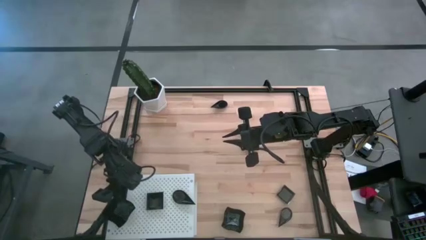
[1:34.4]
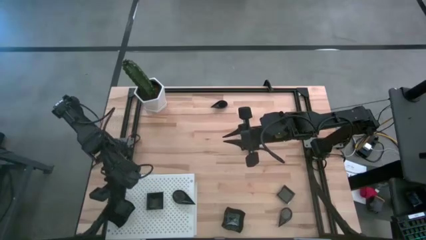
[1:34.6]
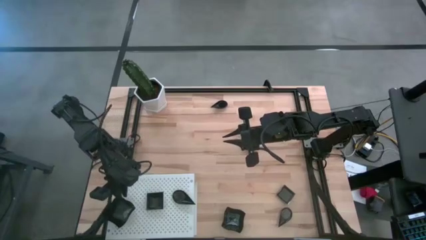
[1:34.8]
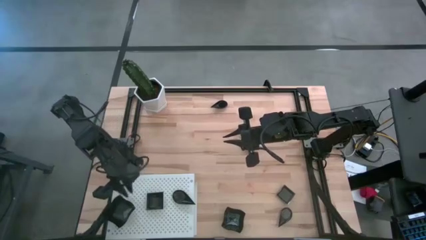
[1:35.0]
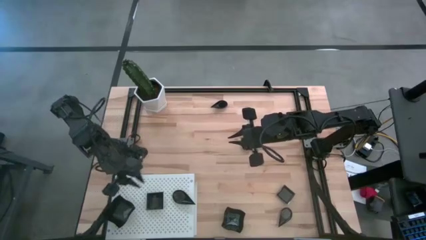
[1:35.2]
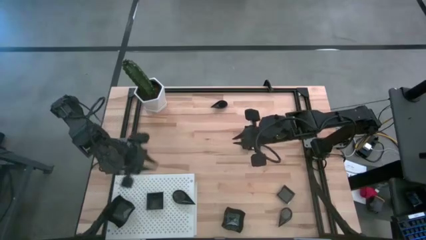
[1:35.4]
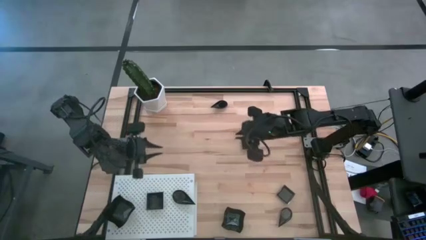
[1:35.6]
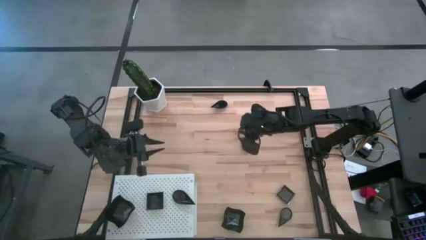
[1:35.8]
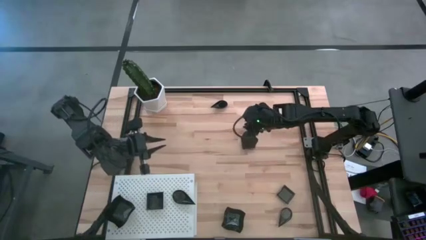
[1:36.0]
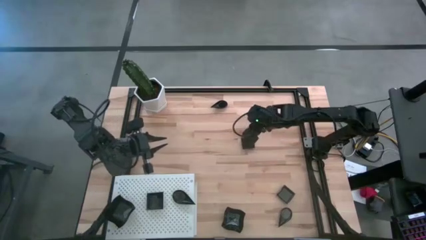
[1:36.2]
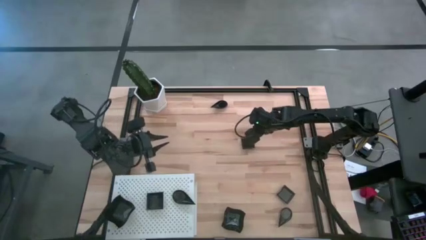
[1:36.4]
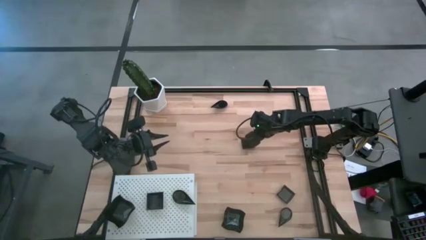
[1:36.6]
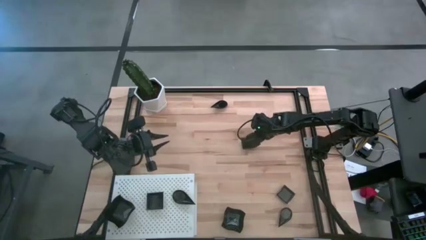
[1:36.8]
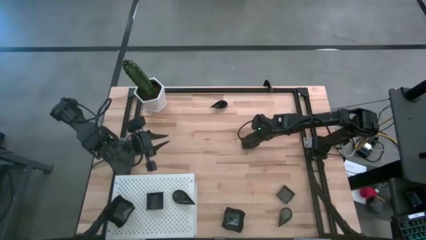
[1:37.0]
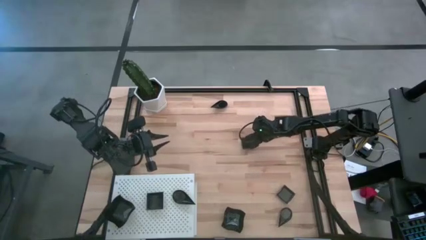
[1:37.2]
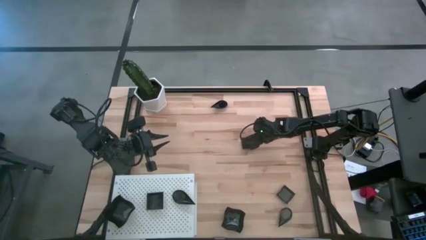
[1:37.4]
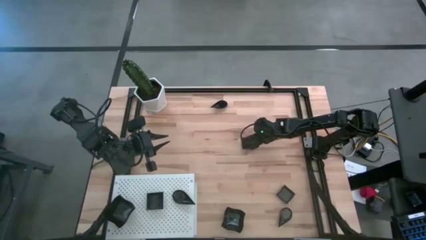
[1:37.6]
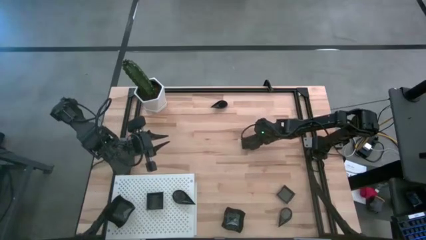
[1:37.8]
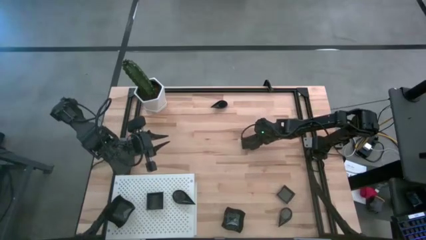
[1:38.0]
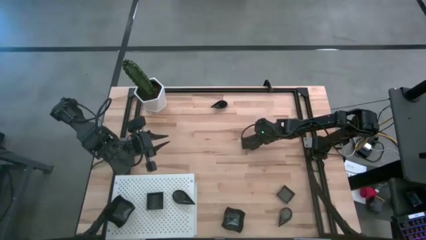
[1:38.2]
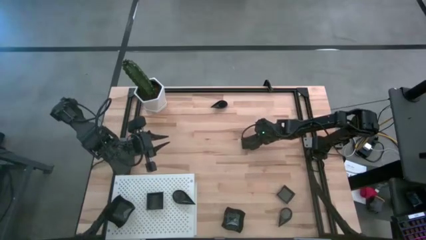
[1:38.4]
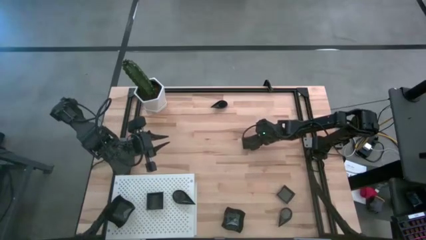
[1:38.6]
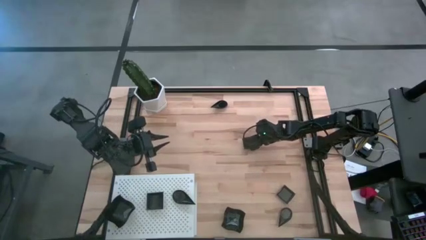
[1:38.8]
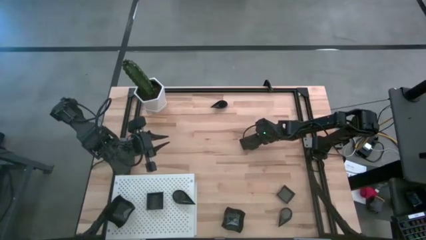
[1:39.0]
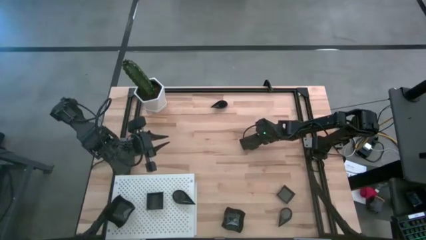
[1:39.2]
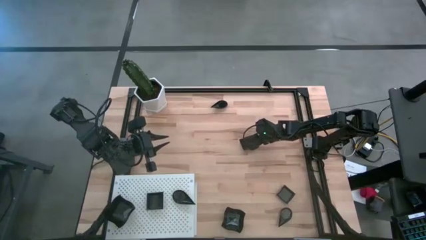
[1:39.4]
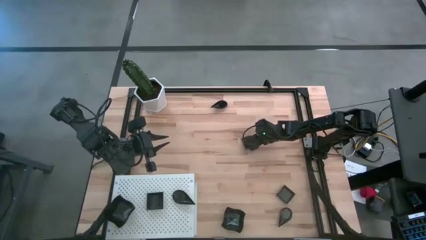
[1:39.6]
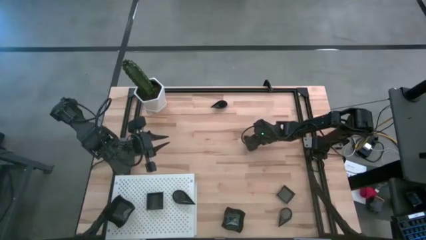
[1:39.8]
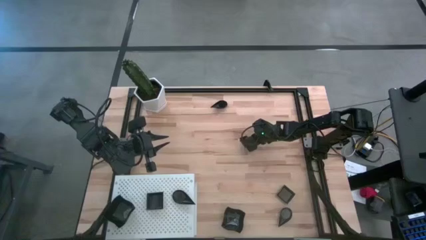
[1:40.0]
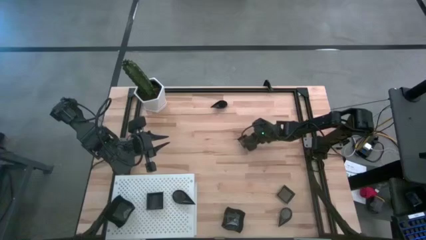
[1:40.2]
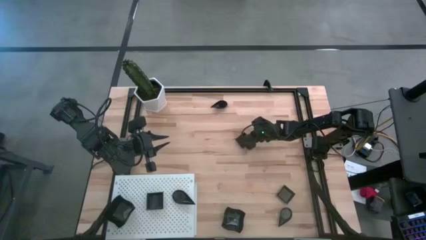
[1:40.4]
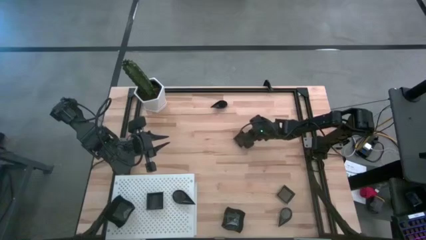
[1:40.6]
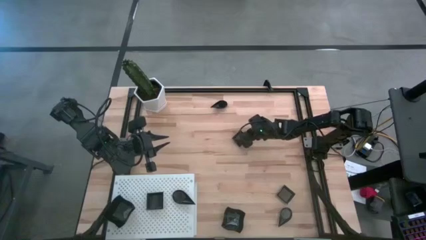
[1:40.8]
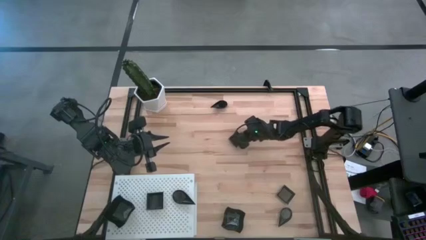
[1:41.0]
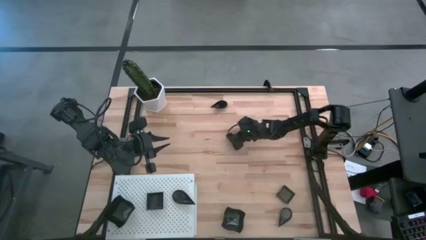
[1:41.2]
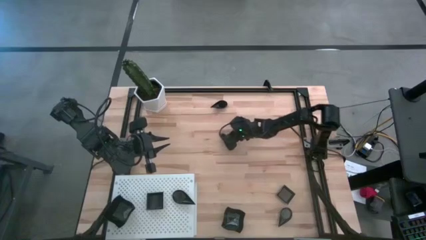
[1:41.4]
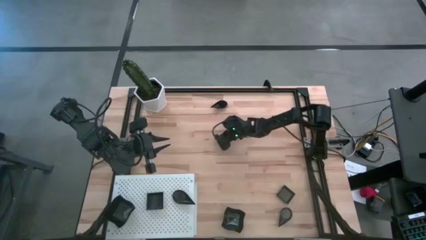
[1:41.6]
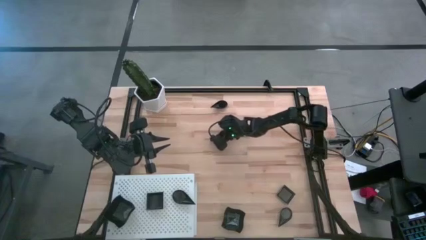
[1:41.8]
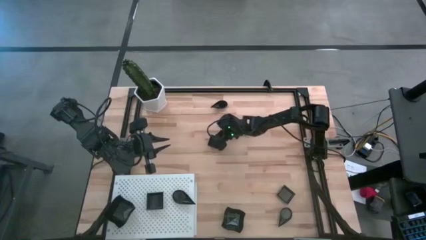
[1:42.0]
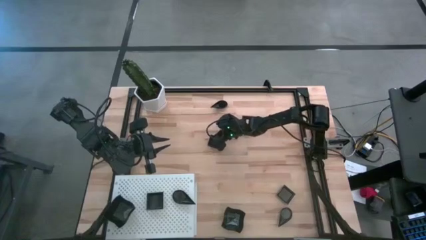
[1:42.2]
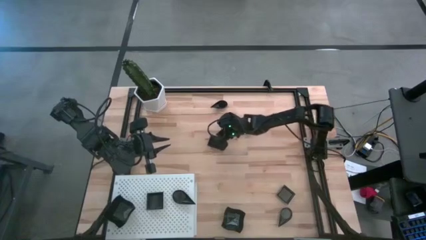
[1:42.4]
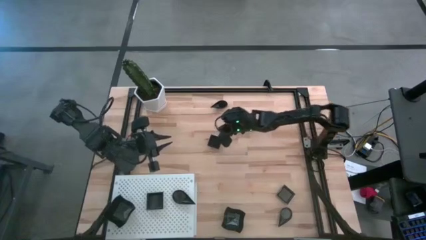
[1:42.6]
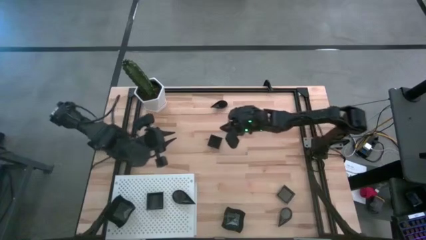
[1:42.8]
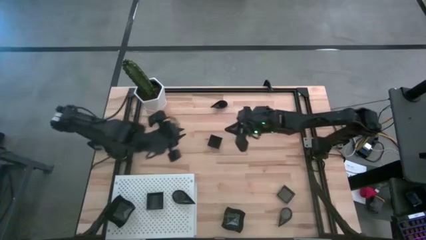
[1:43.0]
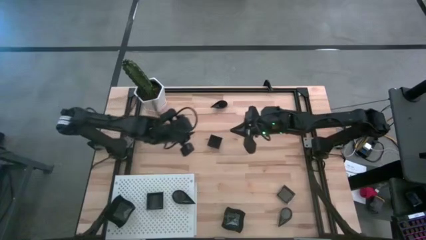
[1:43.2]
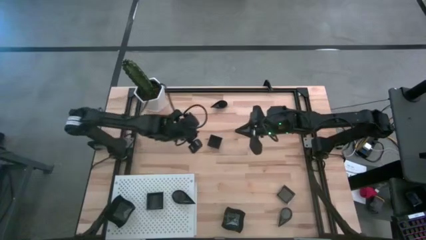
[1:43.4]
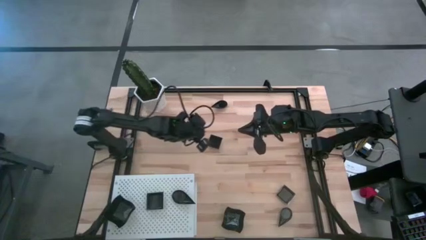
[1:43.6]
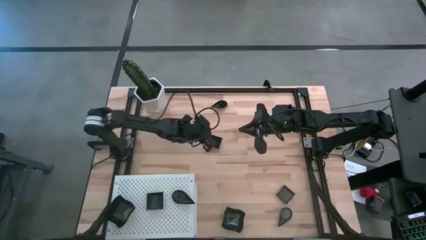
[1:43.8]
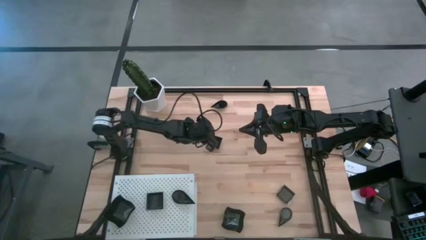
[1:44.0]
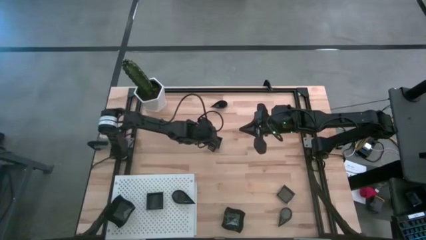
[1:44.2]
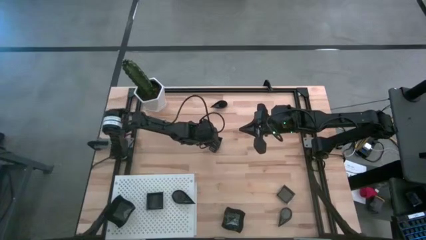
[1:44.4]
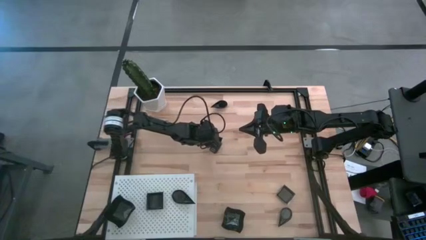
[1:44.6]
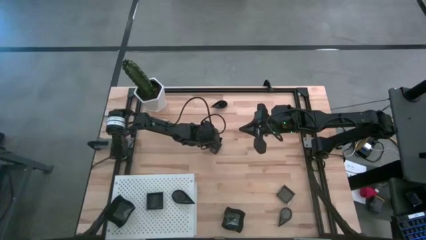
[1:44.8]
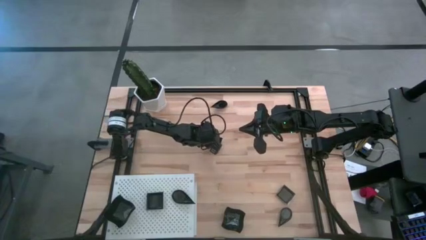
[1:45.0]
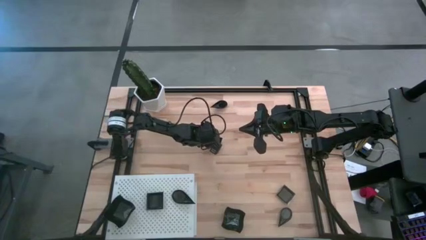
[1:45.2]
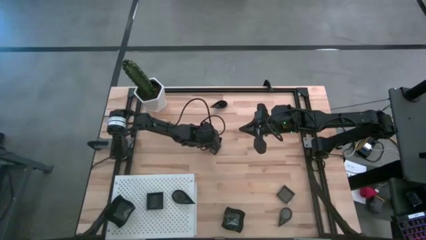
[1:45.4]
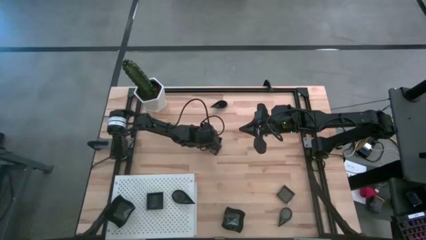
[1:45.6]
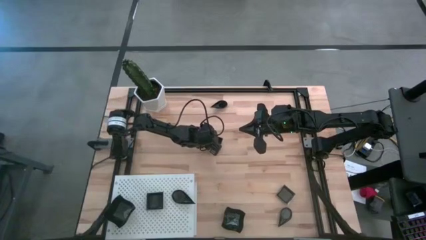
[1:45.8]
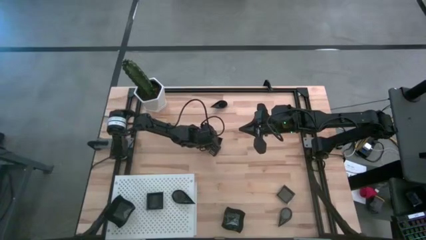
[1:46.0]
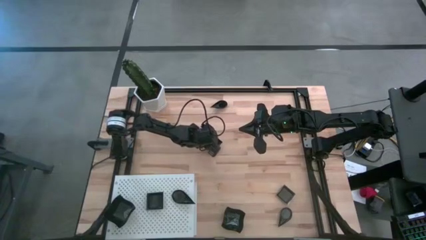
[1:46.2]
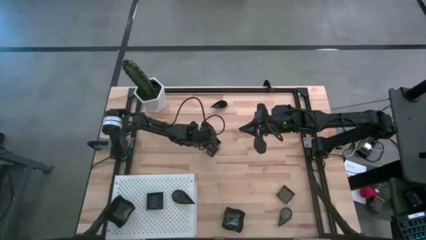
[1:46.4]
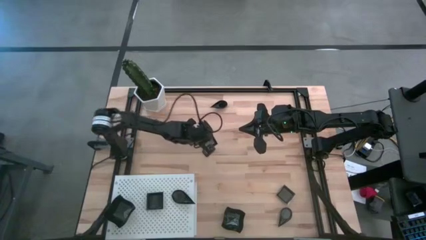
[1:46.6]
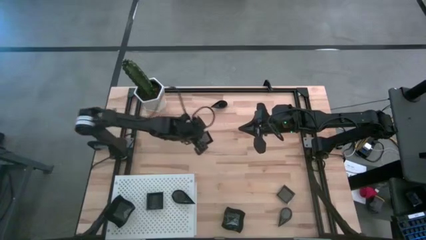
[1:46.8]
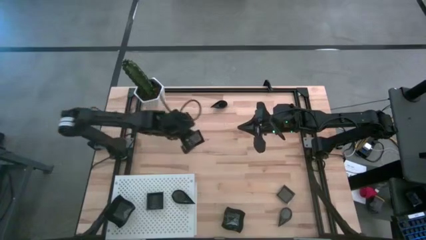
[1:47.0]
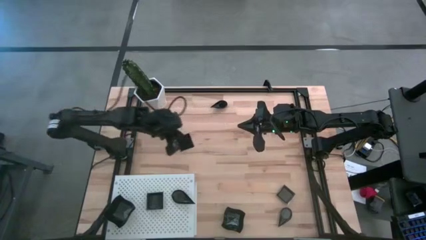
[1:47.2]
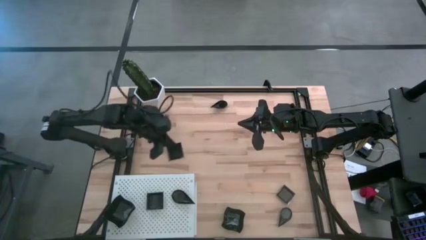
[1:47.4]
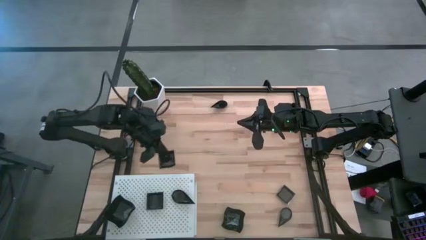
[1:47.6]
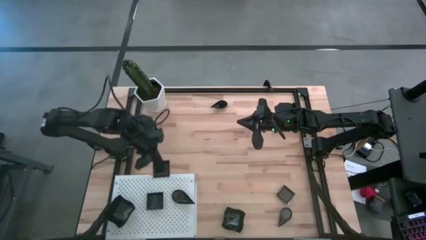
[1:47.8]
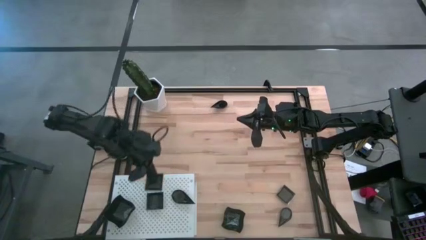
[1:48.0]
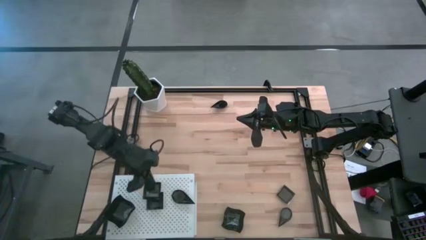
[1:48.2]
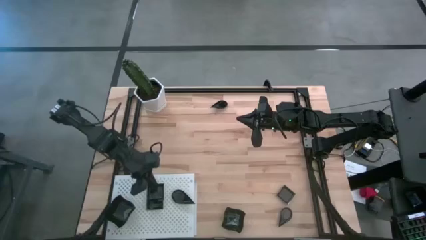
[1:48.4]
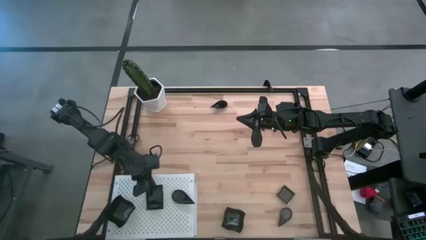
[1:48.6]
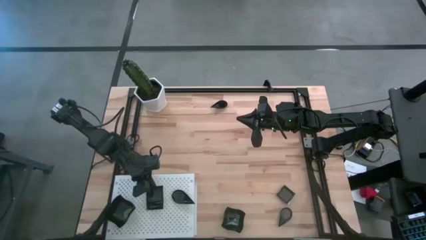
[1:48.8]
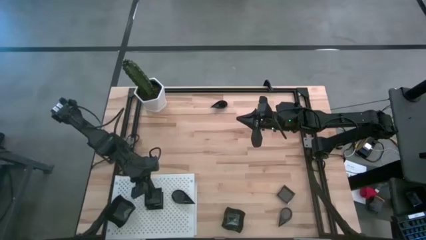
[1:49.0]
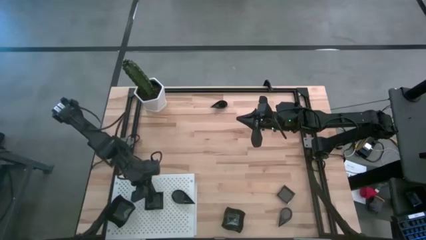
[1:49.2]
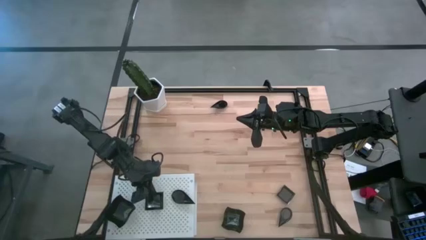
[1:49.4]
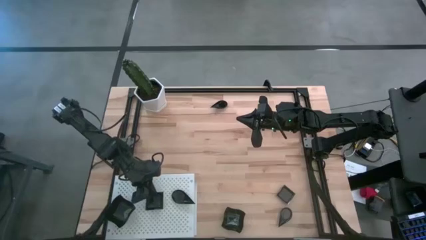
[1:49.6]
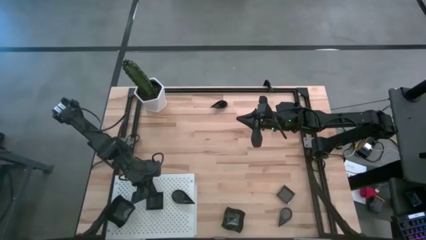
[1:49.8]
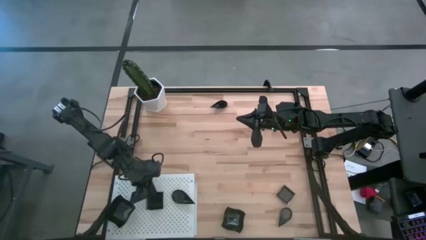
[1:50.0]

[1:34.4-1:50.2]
Task: Pick & Place Mini shaped plates
Stack the square plate on top of the other square plate on the shelf
